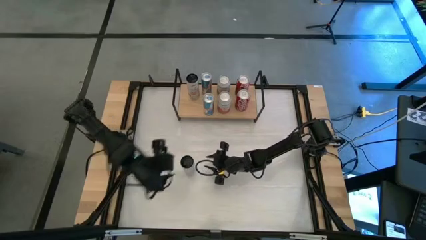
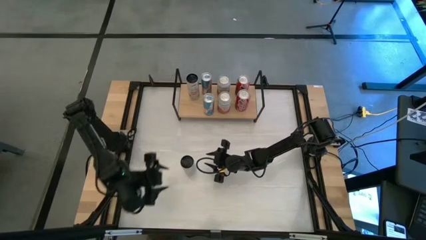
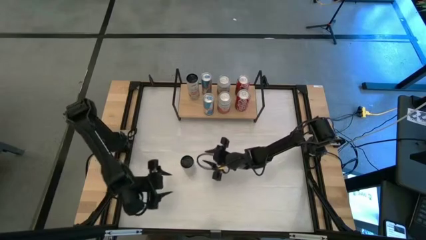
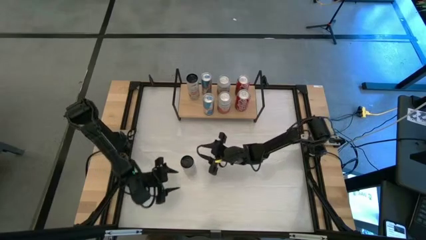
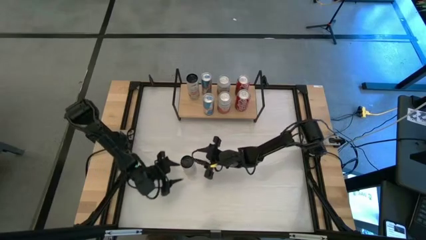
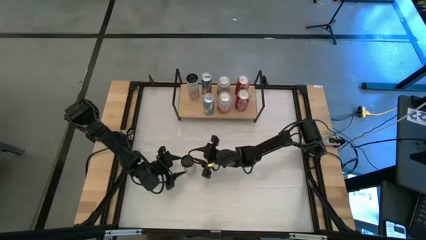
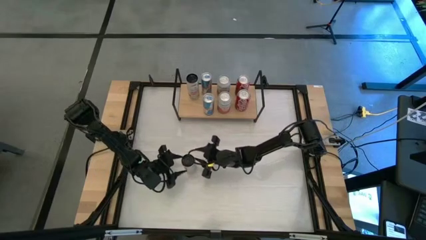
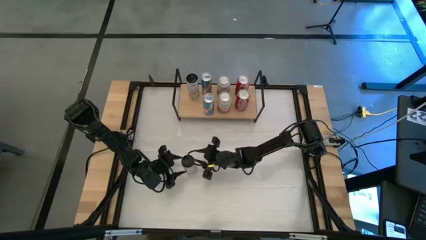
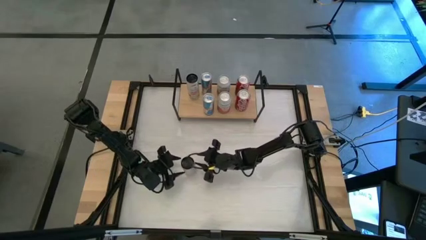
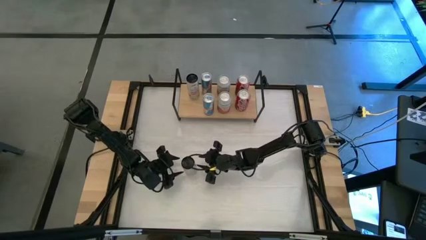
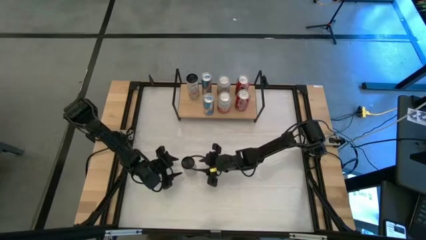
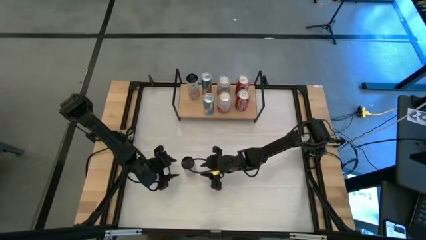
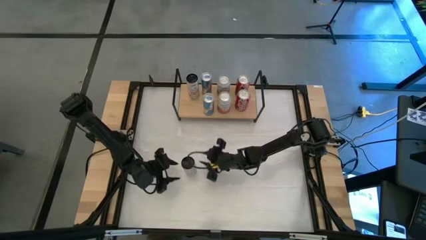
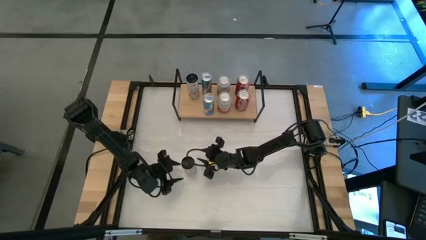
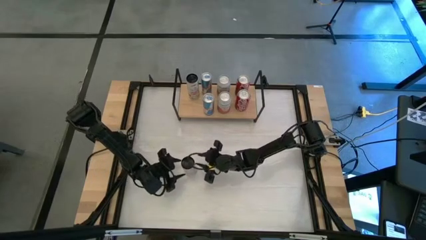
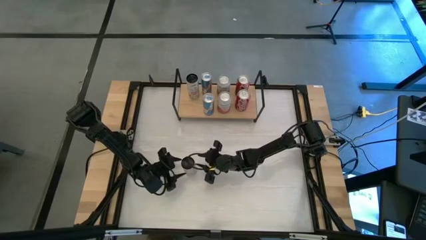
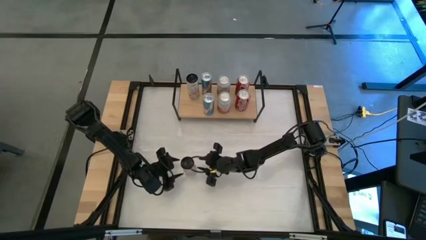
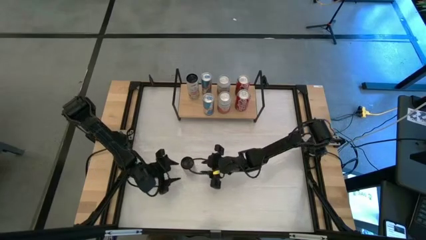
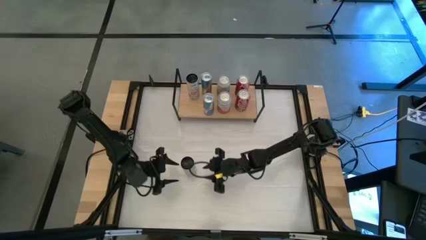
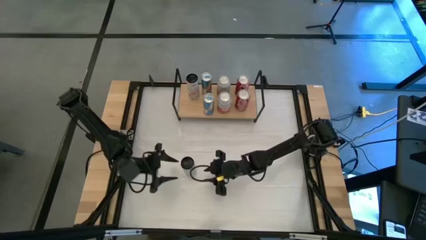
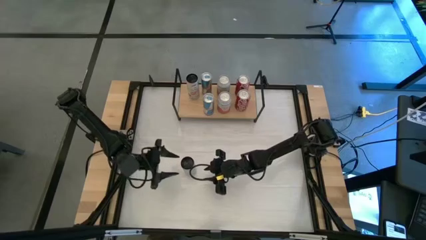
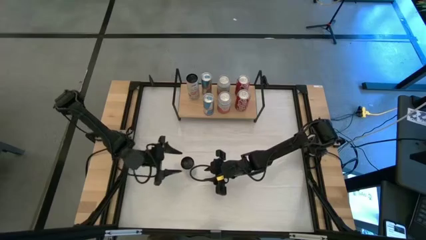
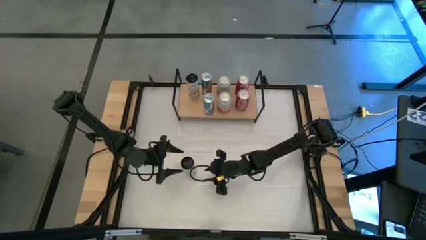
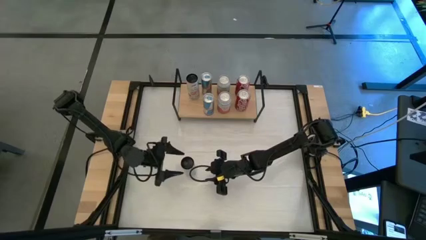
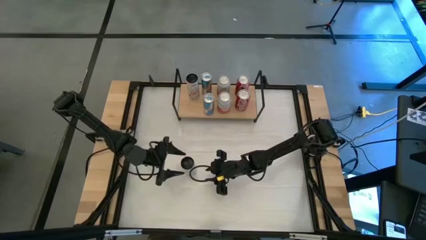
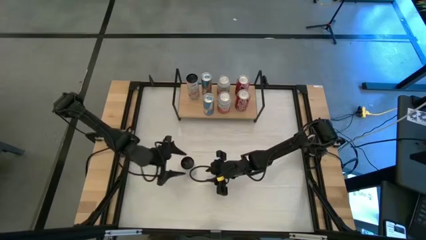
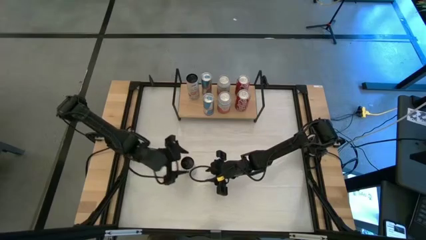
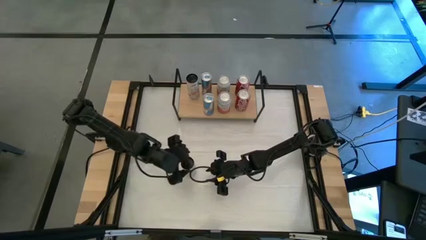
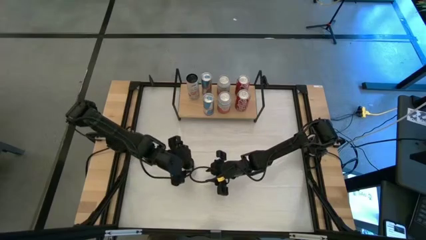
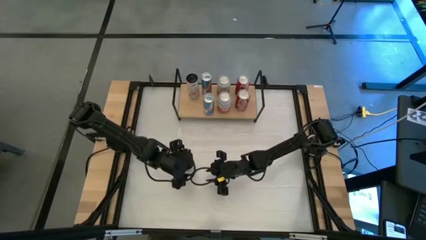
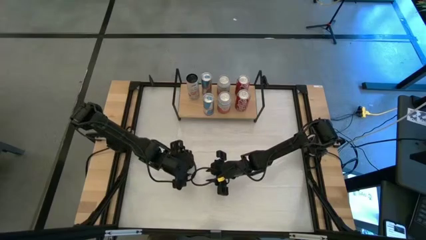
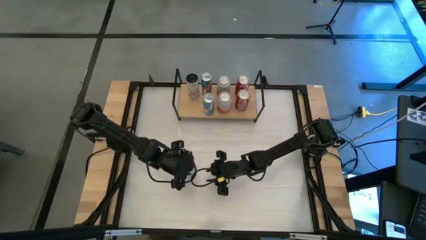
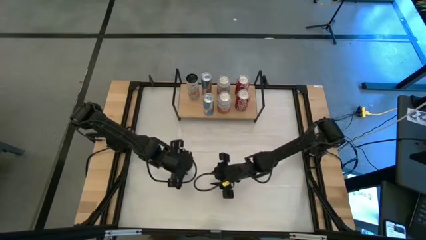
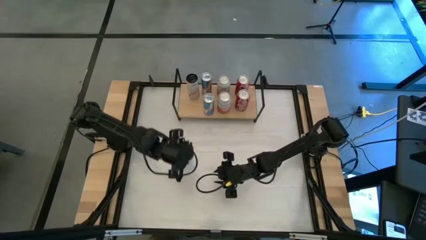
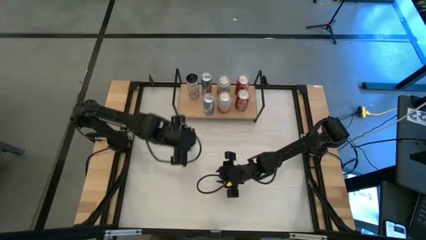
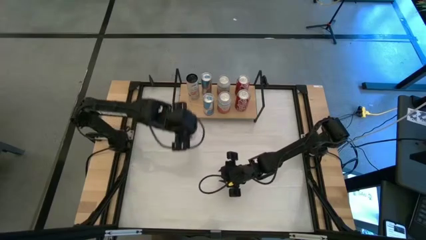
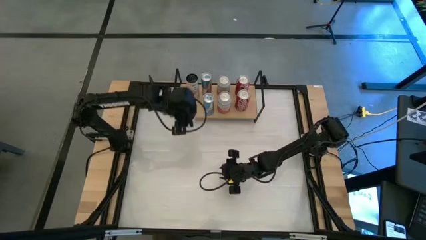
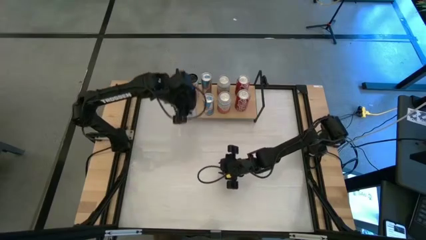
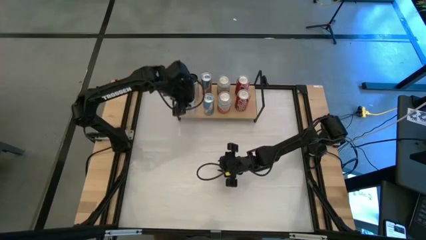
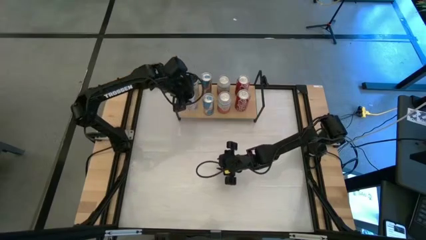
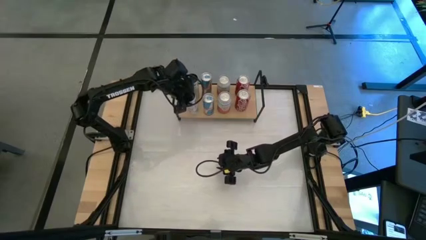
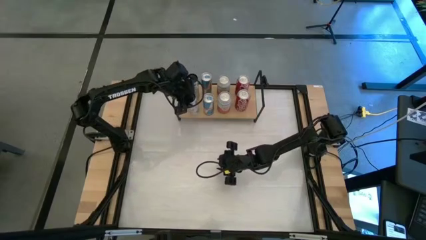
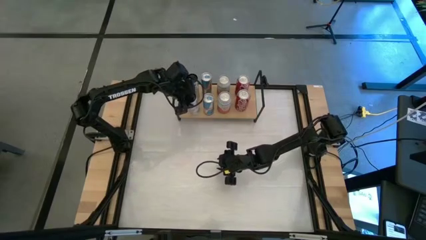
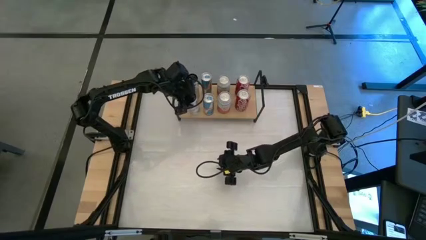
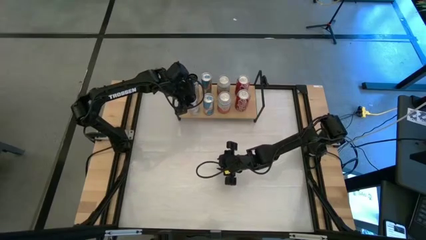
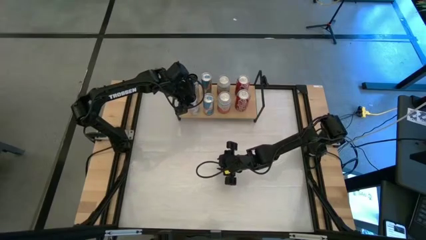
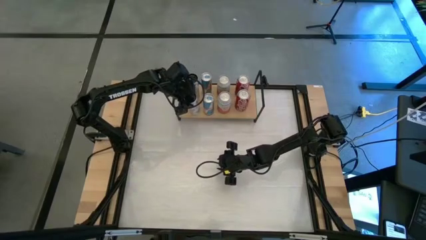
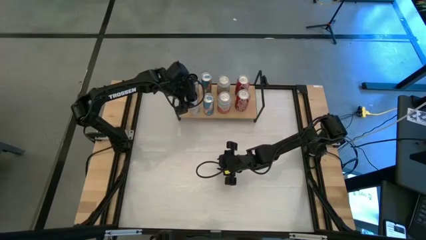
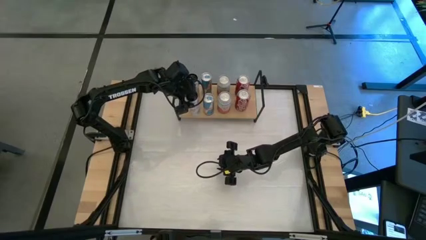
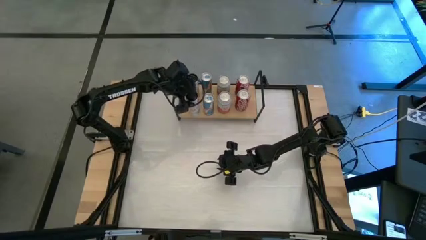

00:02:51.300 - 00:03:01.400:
Task: Place canned beverage on shelf
Put the white pink soda can align with the other white pink soda can on the shelf

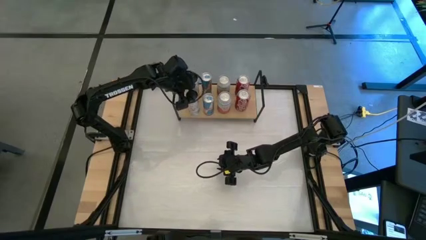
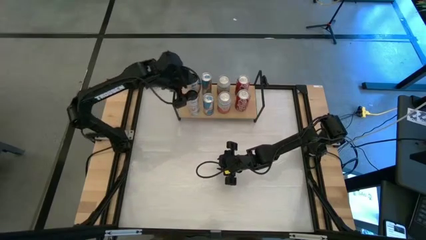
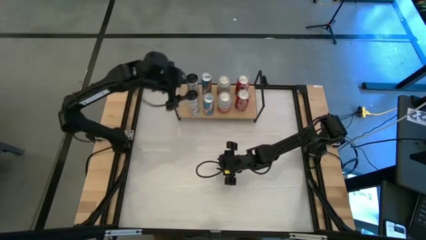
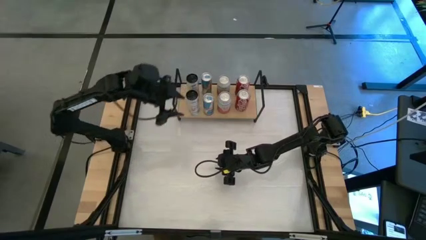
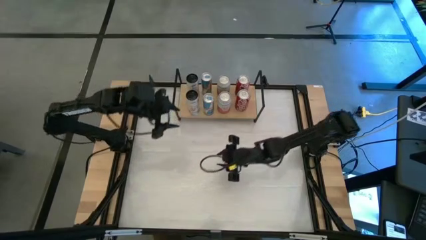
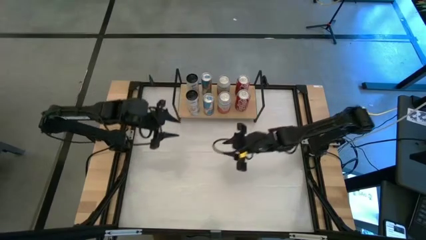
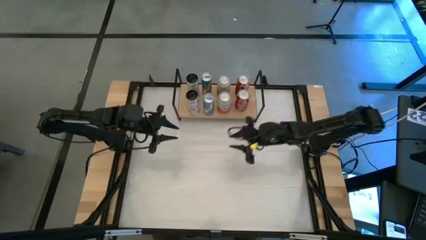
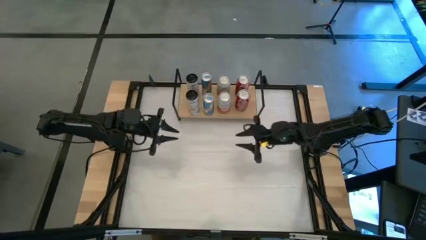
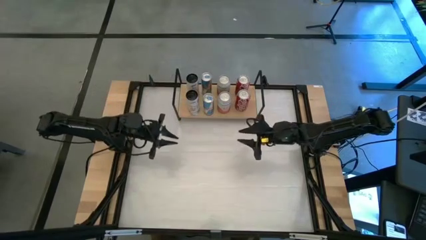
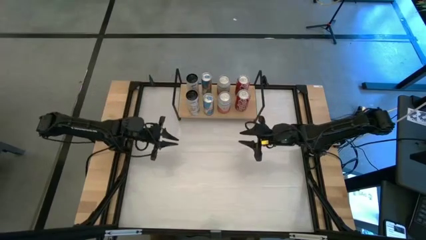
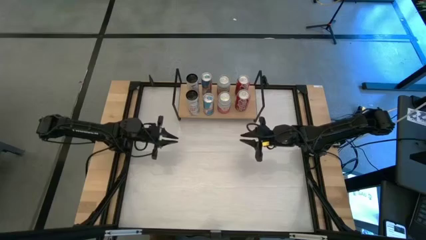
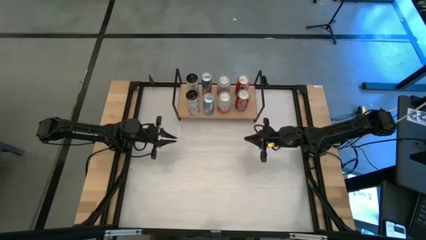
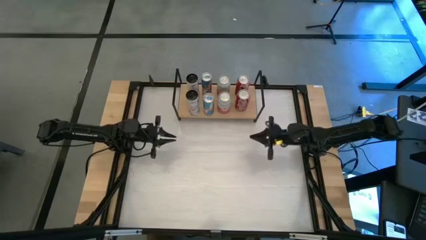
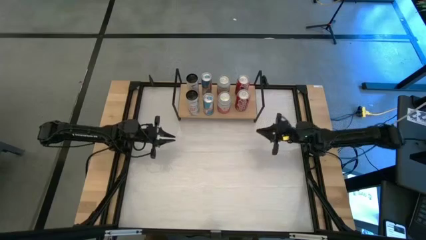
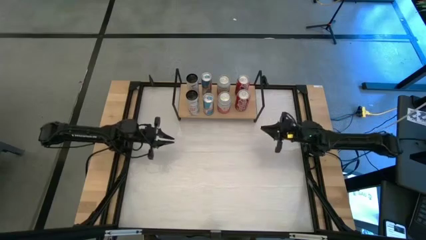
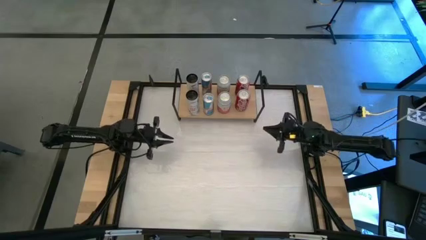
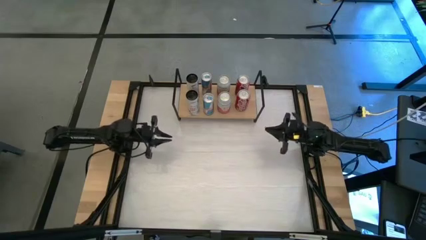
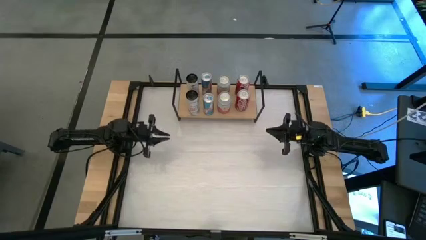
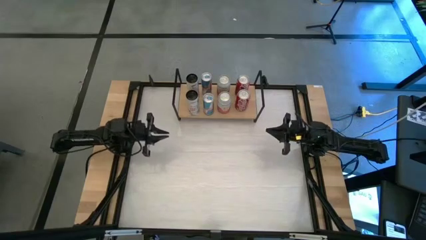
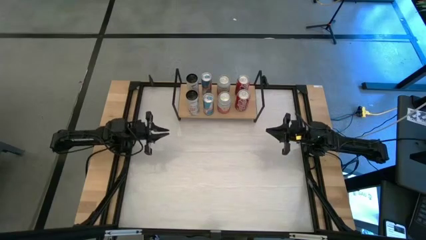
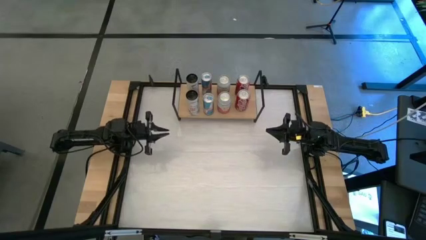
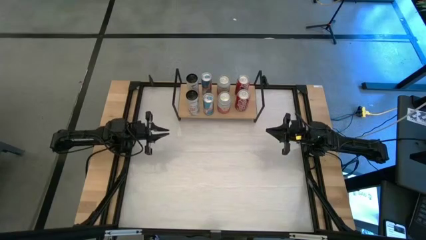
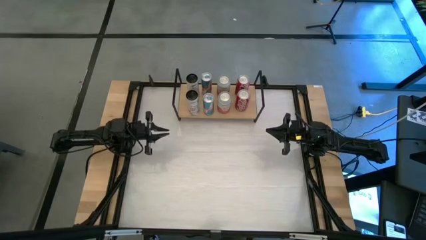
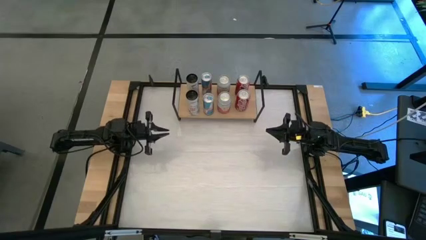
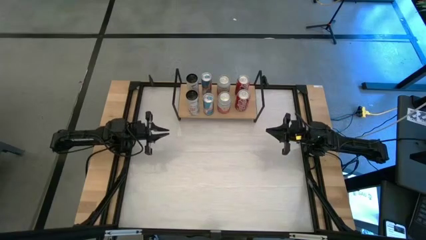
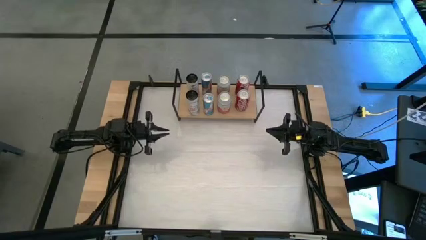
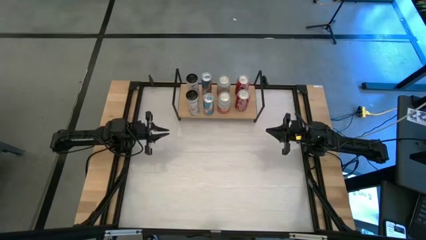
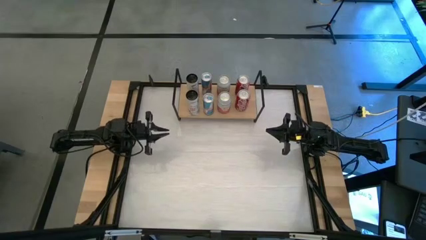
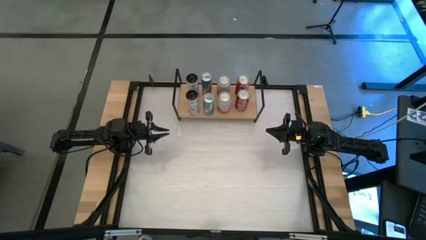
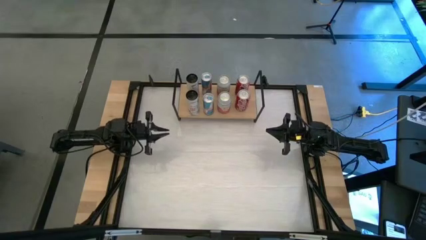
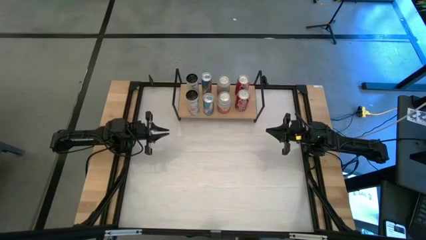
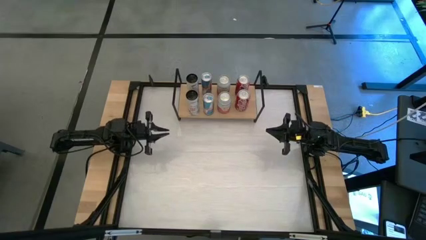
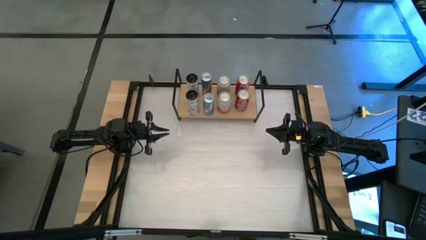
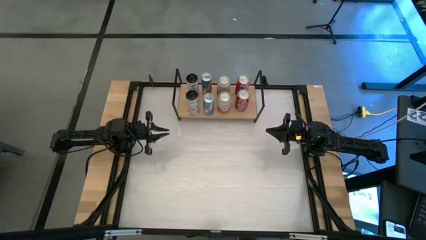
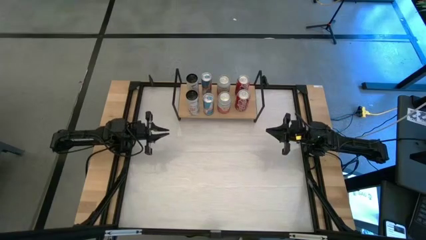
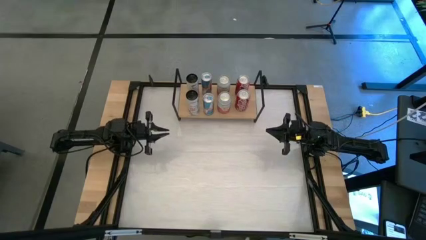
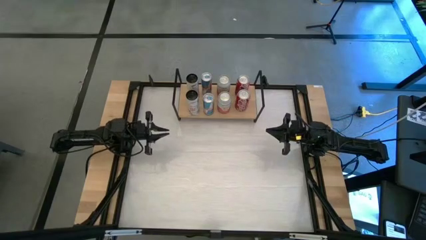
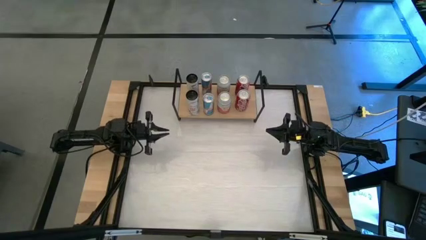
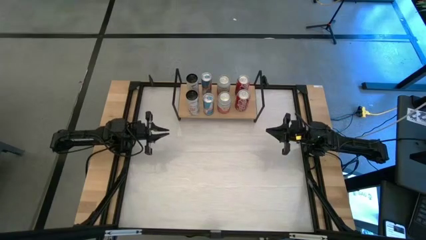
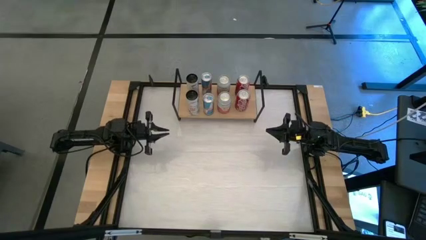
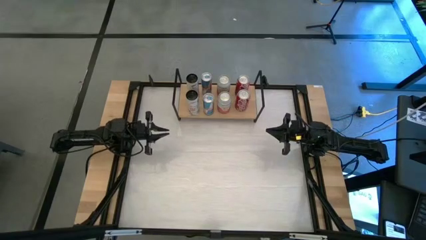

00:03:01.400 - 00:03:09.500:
Return to Home Position
